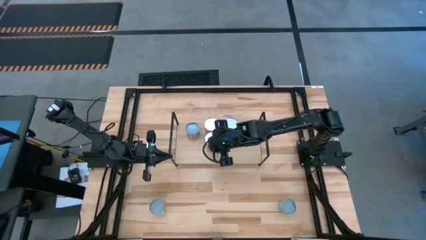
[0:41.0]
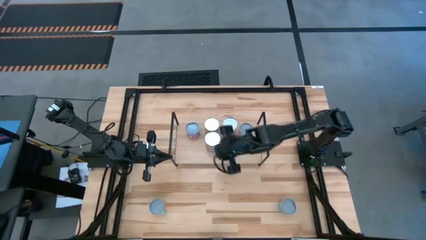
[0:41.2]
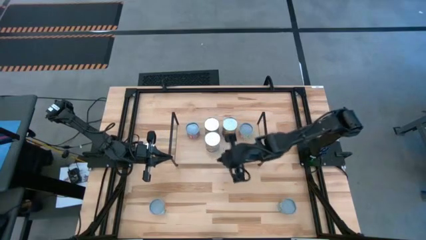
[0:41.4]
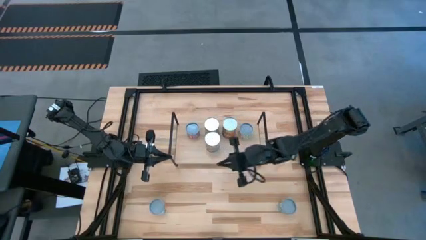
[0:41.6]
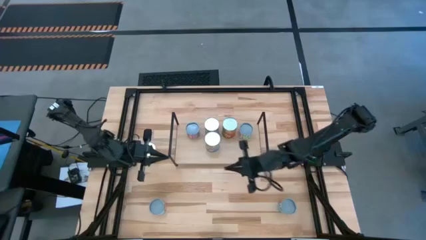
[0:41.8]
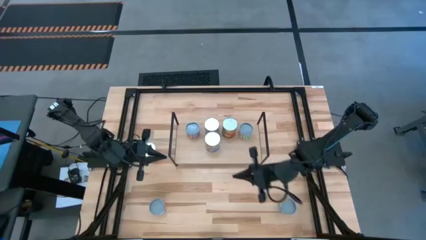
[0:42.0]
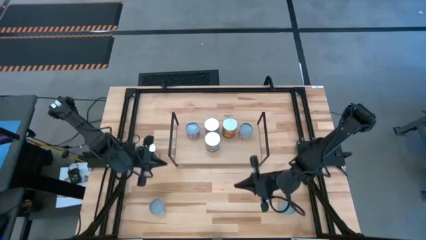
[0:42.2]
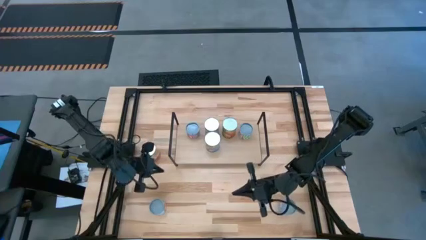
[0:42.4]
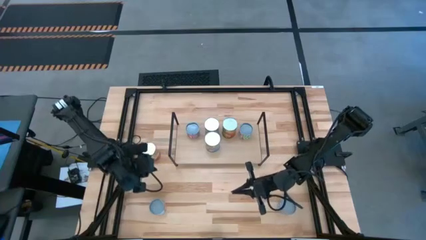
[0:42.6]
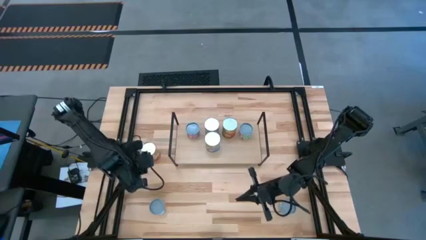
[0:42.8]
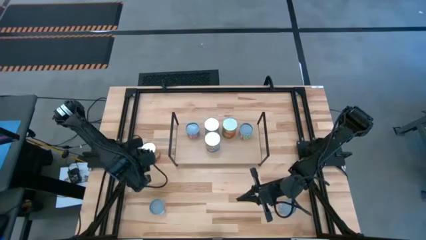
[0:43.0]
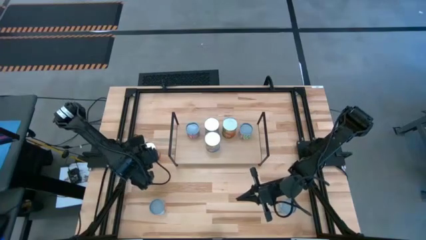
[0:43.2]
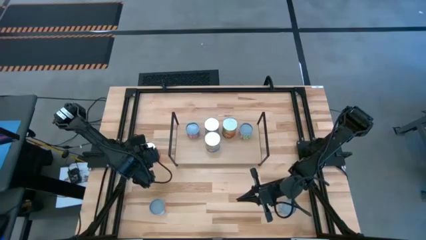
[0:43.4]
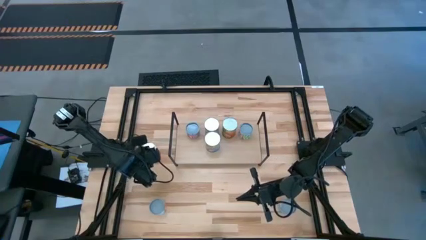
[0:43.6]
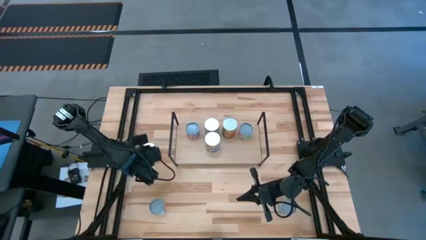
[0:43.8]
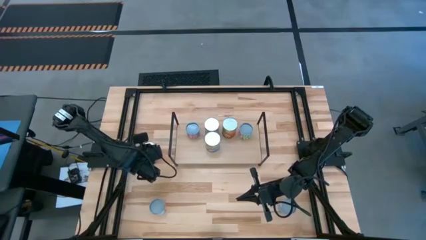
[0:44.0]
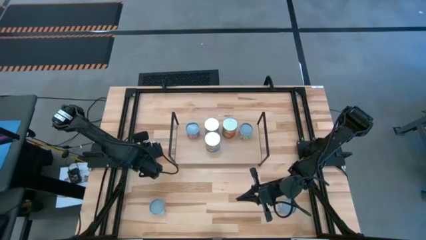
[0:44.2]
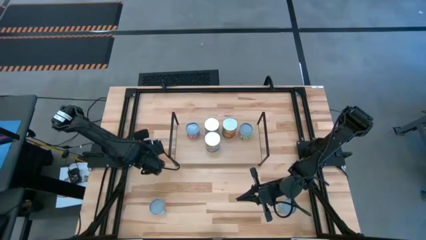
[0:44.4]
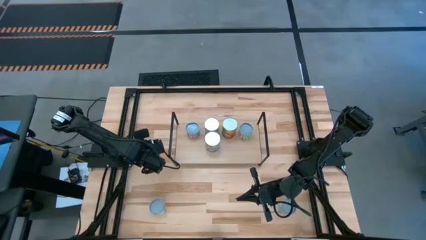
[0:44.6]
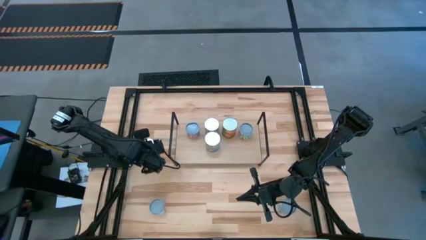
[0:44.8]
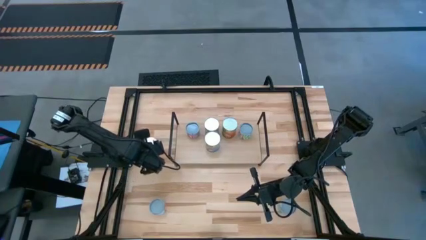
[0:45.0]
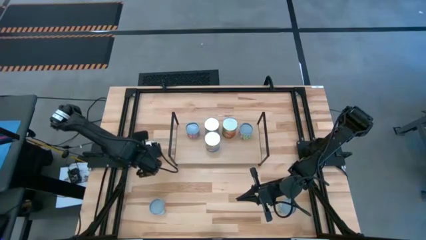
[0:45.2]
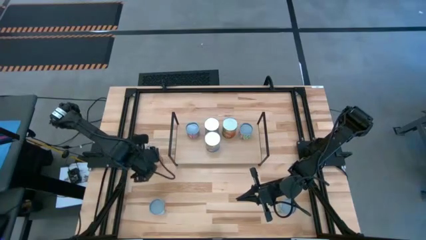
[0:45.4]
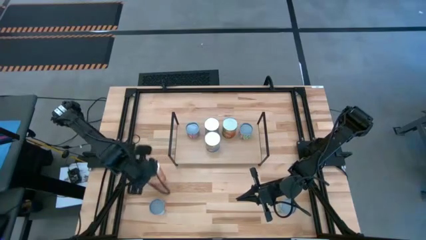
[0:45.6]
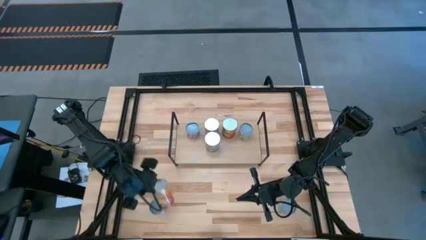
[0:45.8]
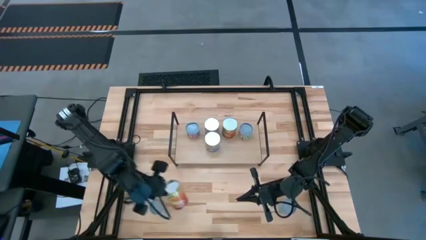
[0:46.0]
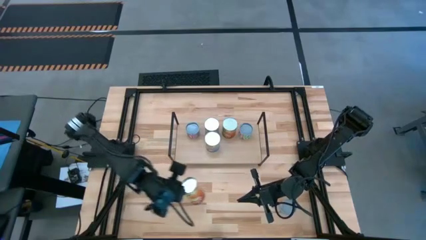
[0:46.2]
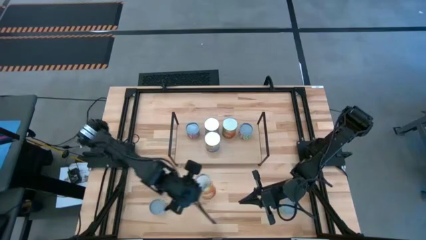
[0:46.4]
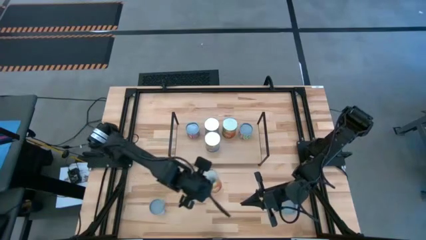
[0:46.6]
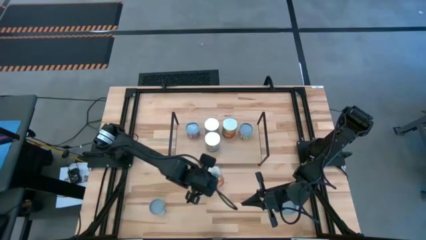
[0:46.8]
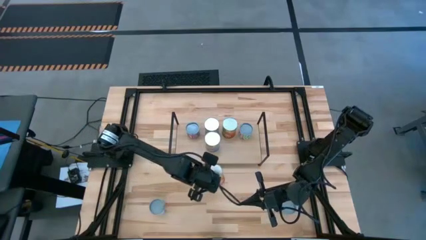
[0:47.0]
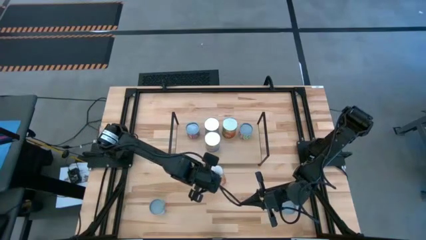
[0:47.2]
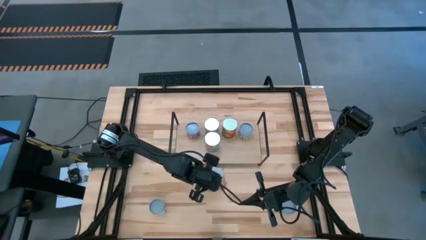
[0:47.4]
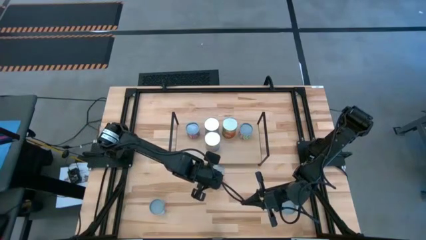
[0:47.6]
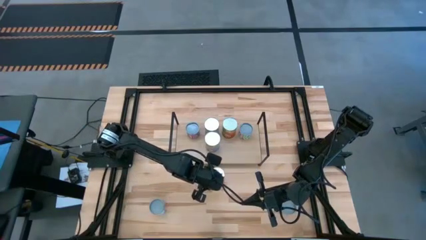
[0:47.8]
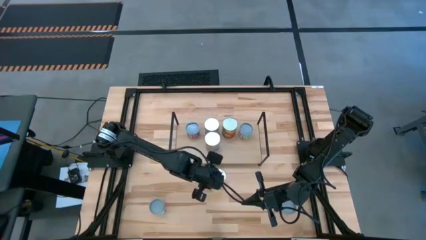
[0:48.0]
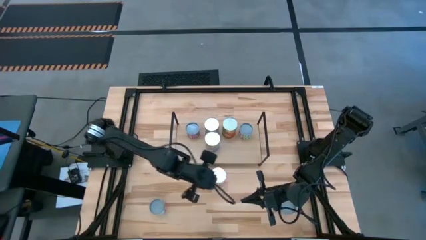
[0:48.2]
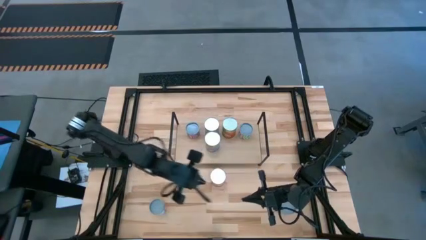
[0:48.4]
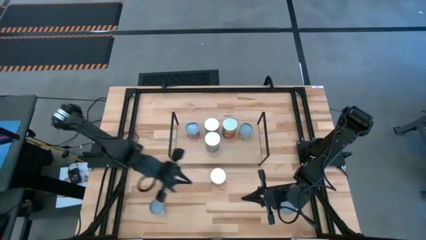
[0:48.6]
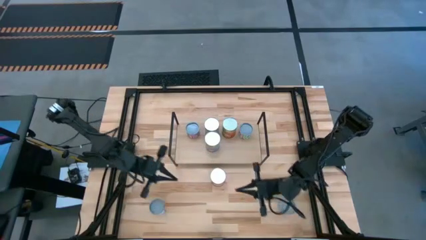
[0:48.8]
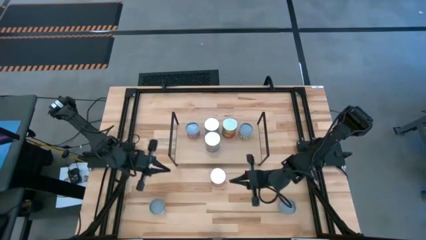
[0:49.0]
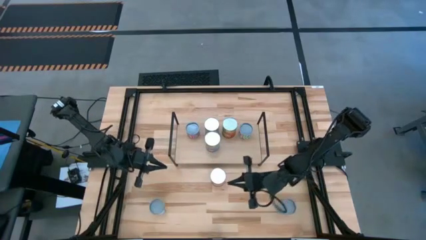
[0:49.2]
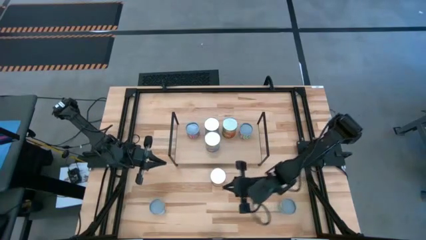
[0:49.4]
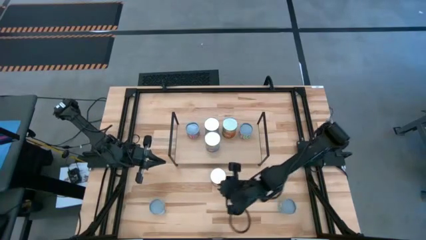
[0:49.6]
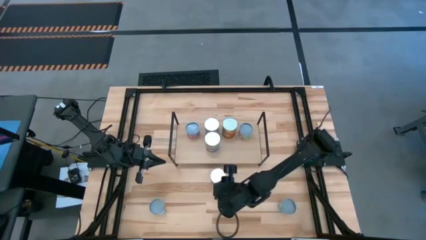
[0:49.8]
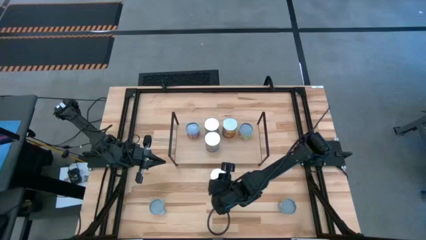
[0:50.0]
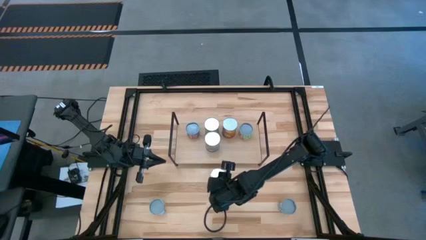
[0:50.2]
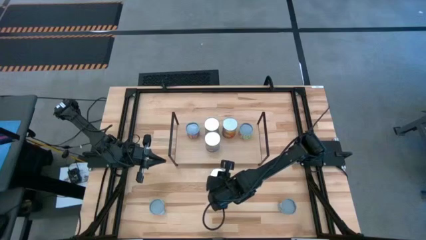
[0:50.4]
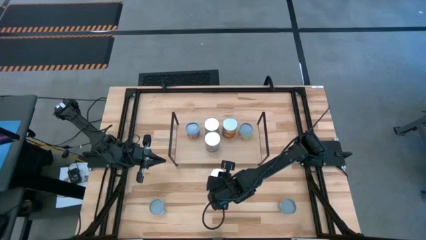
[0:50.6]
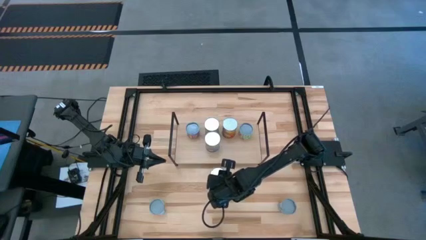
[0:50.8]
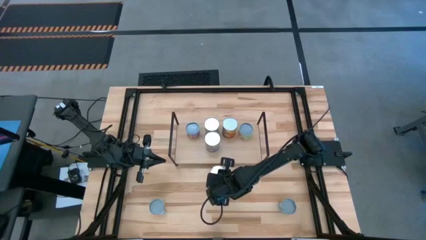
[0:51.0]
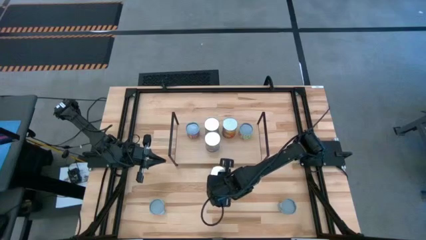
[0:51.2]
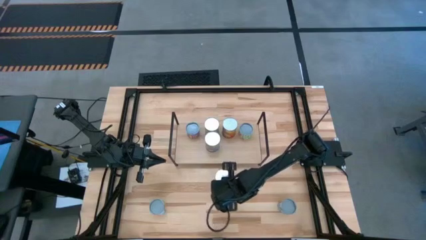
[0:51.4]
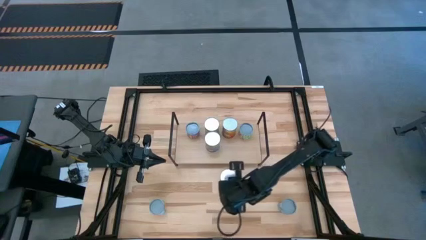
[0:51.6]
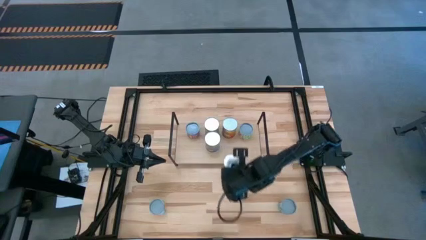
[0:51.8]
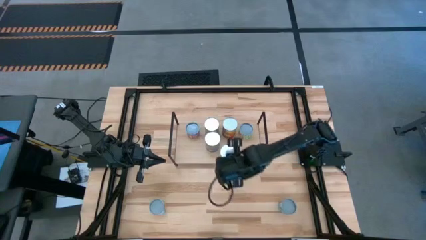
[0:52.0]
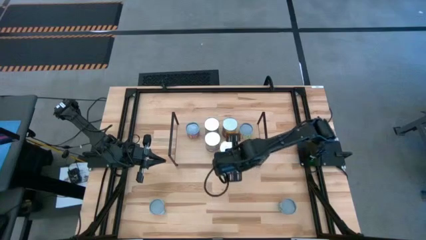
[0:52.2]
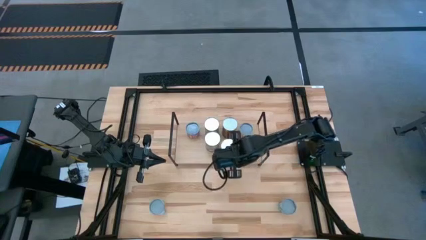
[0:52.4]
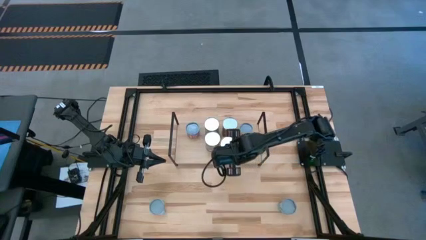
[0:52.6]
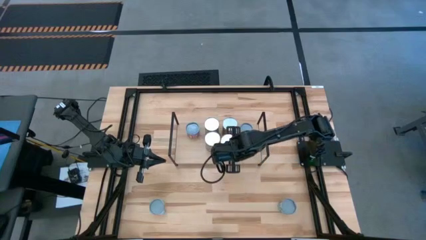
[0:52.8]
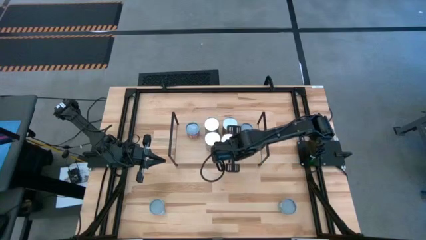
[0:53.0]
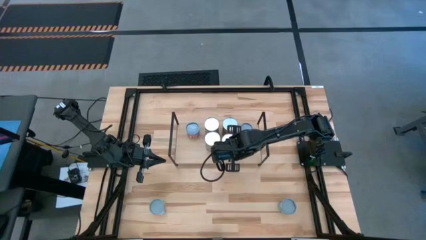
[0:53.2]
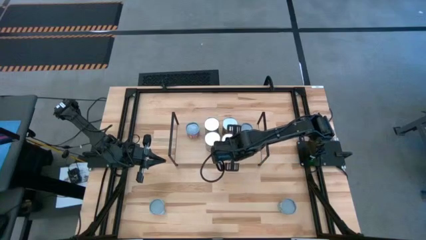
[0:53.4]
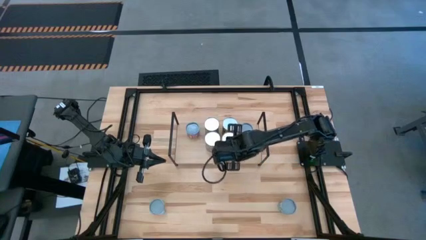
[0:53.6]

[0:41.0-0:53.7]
Task: Pick and place cans onto a shelf
Put the canned corn on the shelf

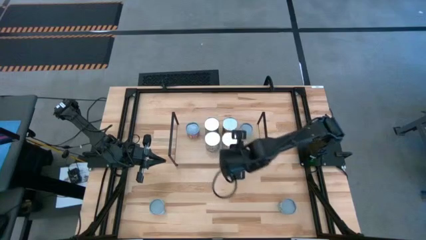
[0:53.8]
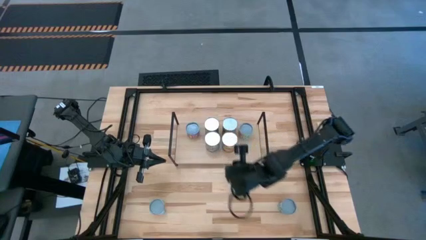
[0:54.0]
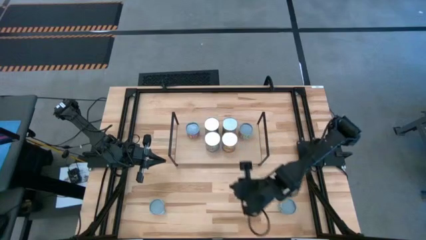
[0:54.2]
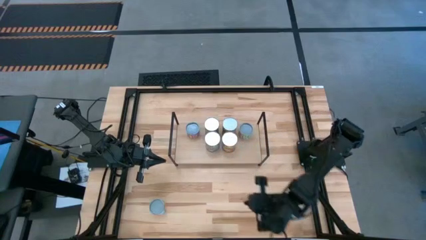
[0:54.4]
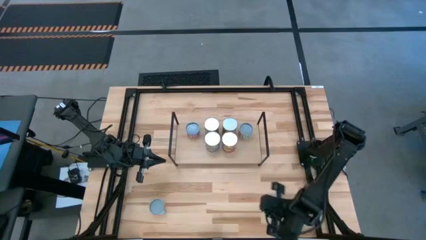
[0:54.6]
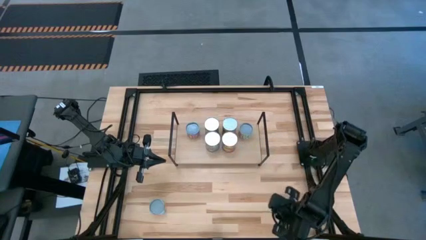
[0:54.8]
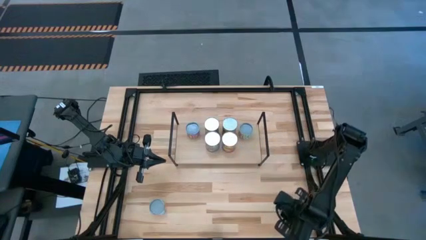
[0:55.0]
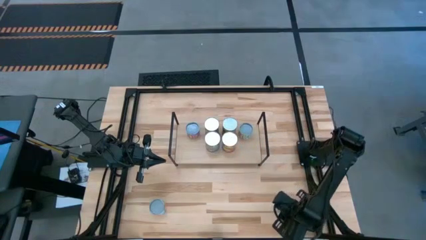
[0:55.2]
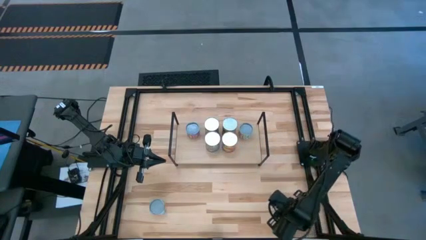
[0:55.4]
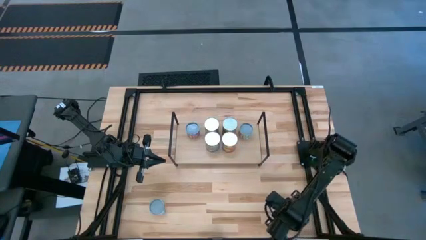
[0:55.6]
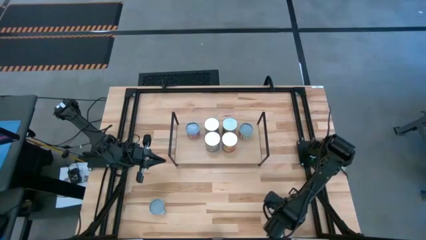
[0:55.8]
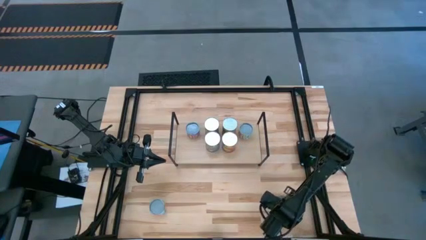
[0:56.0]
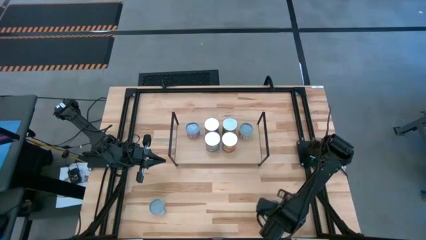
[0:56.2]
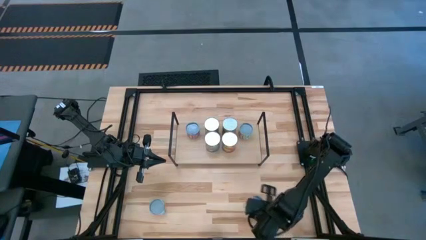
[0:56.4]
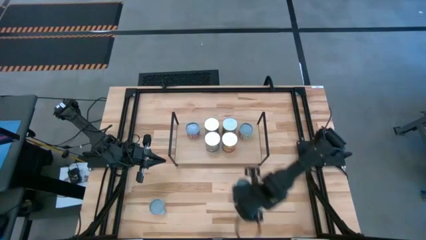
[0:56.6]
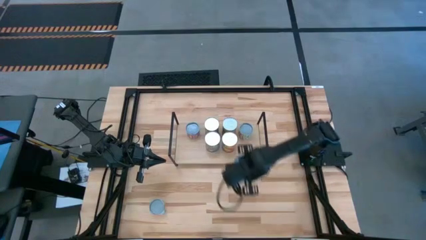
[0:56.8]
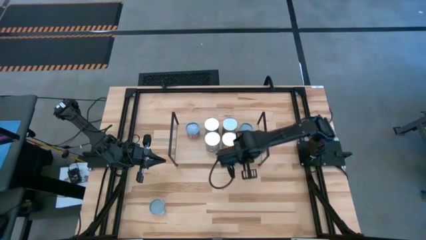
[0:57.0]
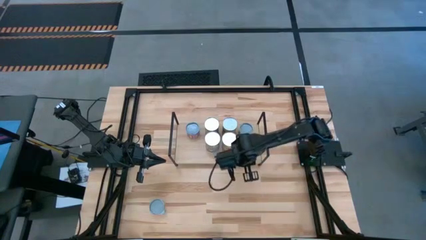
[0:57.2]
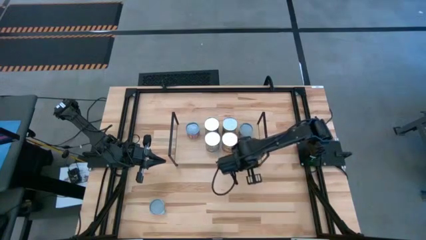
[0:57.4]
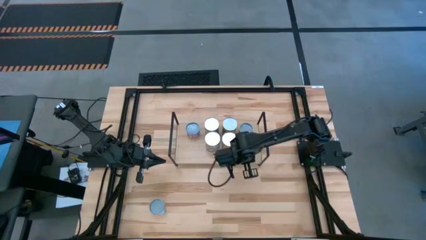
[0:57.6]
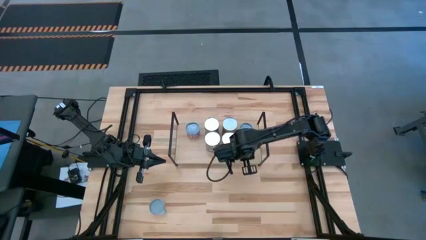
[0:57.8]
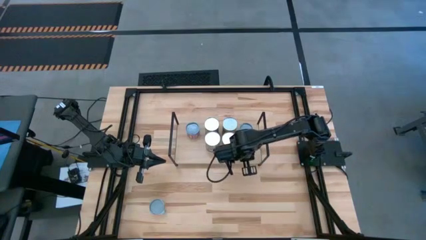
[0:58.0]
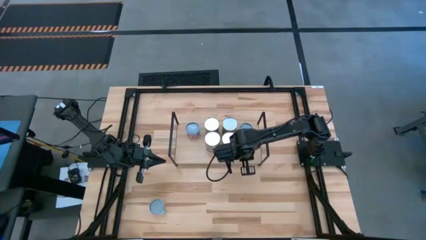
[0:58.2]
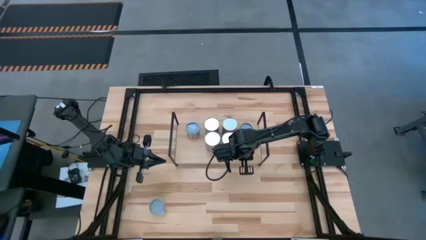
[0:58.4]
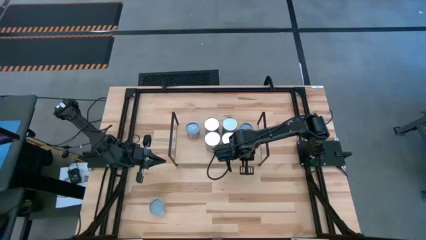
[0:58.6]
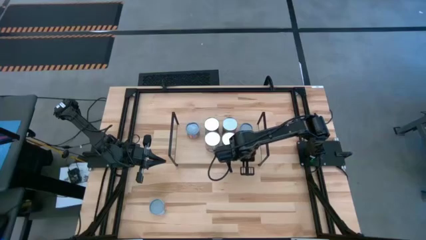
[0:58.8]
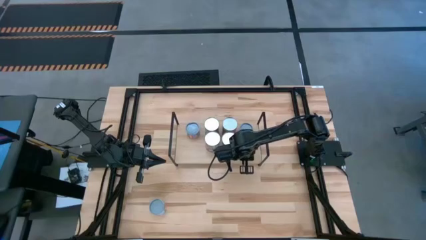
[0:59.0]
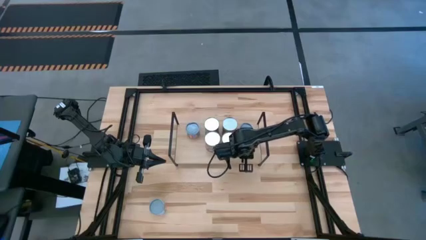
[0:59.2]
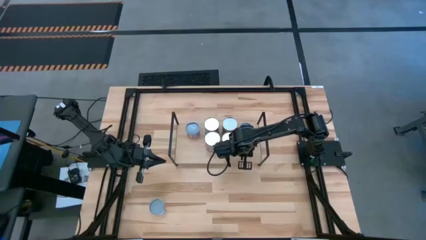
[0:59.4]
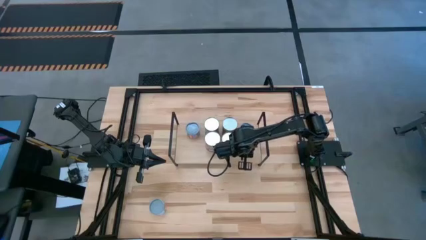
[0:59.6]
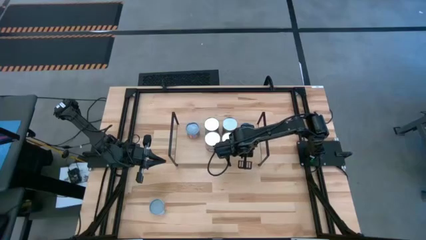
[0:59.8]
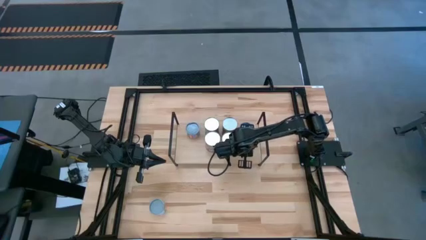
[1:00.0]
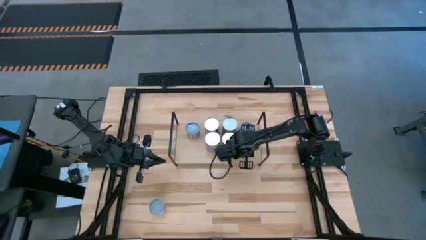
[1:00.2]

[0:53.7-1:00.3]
Put the canned carrots on the shelf
